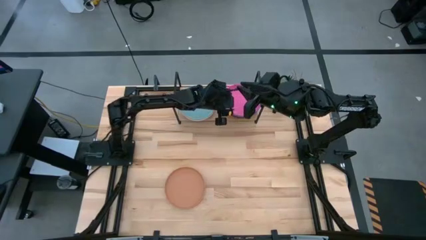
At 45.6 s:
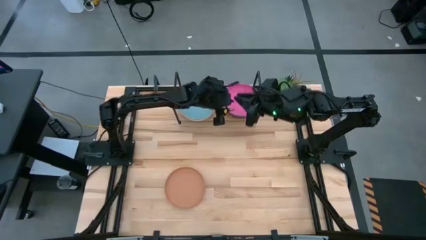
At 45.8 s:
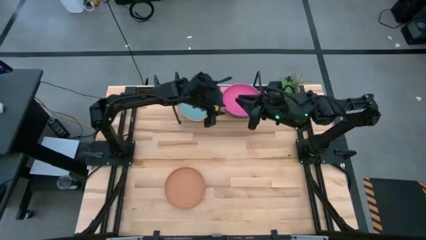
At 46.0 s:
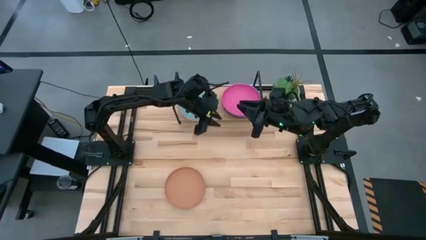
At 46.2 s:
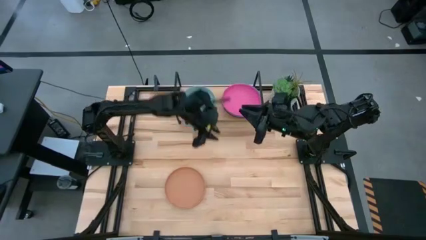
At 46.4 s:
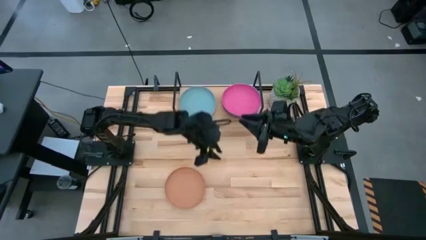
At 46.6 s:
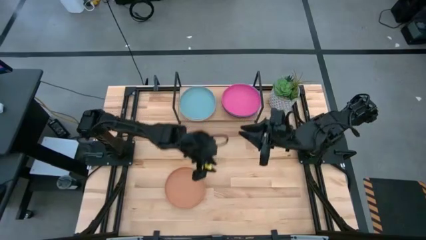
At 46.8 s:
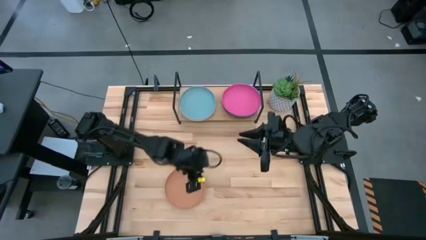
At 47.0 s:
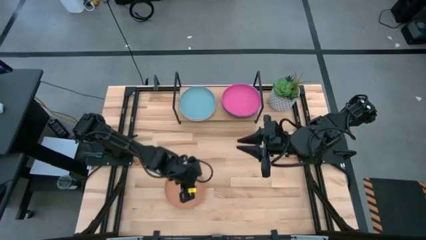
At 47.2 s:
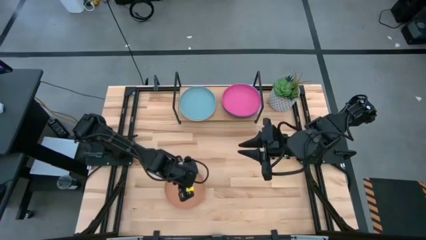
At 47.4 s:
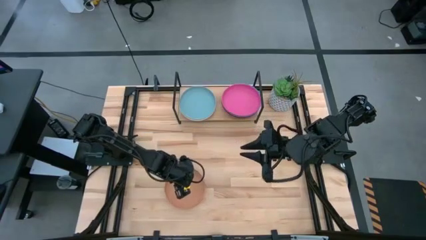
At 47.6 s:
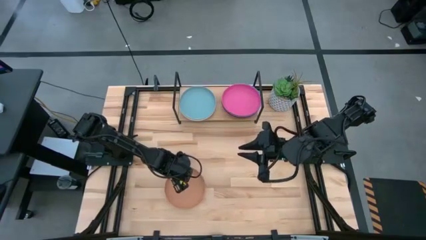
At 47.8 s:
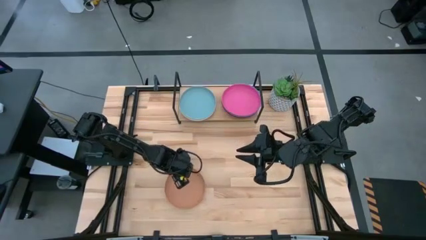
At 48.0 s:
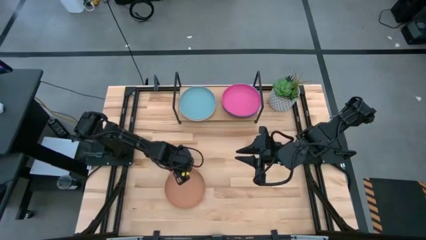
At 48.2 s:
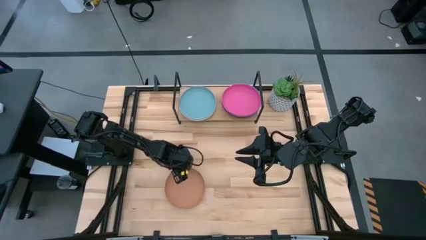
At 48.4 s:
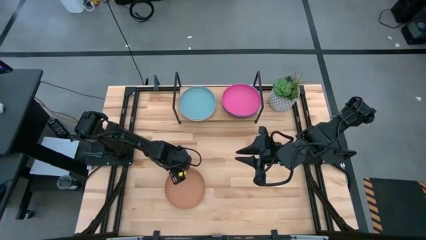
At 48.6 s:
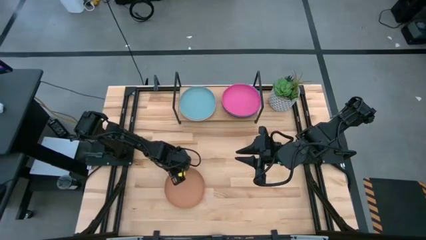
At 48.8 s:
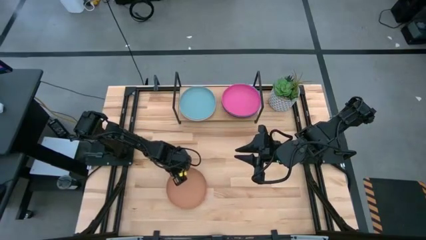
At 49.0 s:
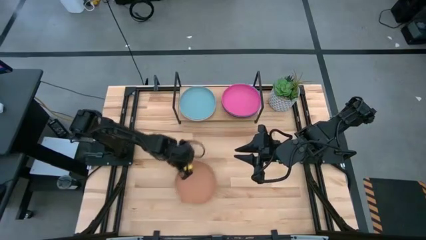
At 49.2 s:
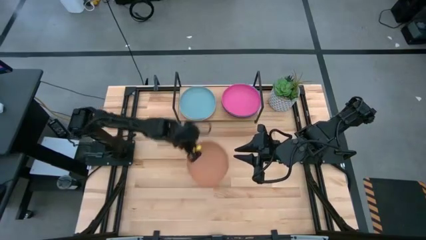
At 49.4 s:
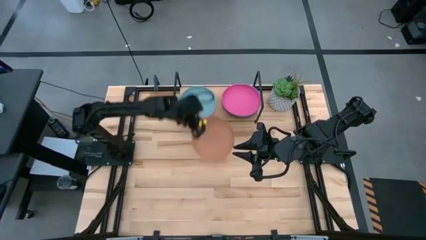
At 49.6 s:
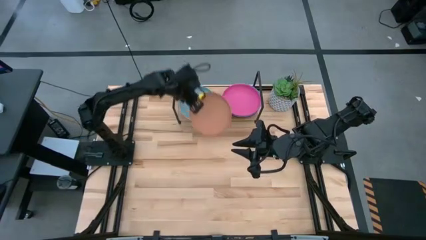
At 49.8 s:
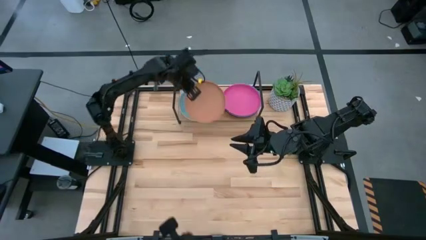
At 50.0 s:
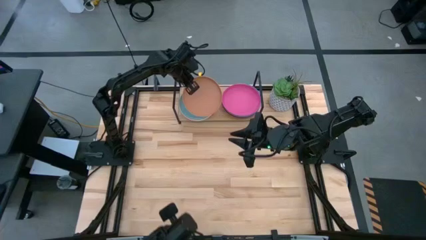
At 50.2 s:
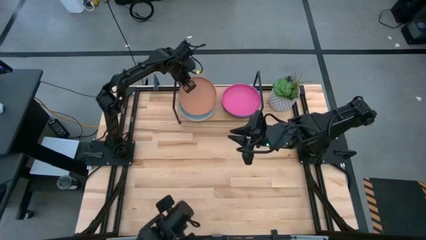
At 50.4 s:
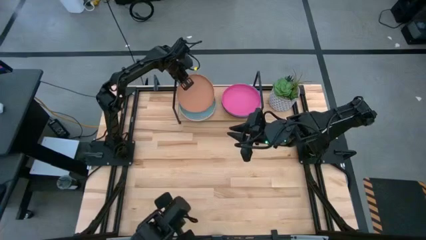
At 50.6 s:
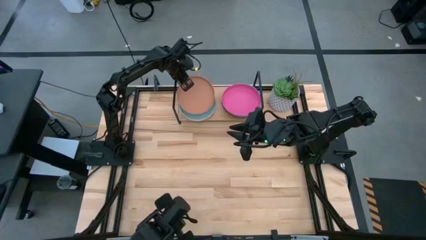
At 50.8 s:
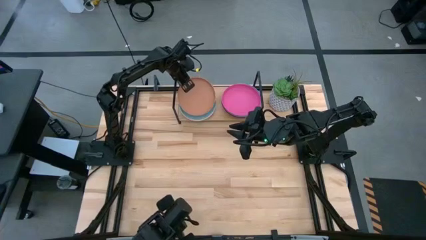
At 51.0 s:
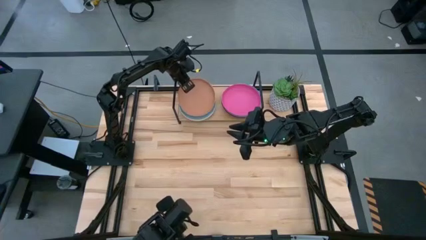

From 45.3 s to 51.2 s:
Task: Place and stack plates onto a shelf
Stack the brown plate on top of the light blue plate on the shelf

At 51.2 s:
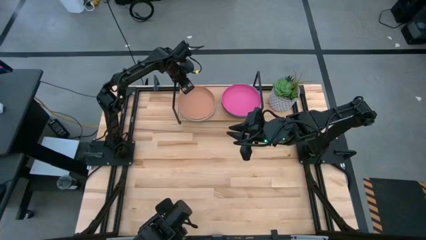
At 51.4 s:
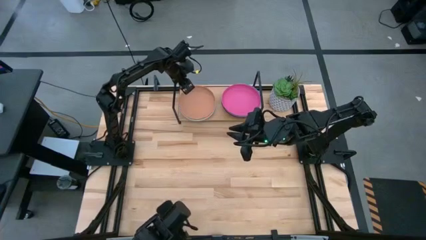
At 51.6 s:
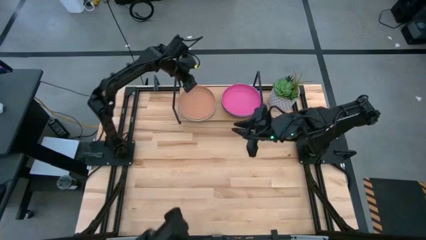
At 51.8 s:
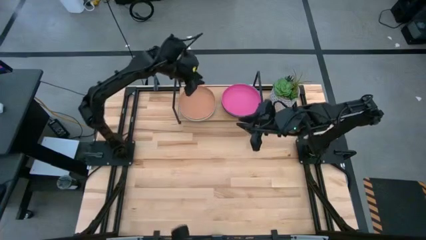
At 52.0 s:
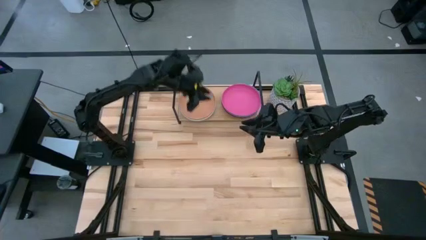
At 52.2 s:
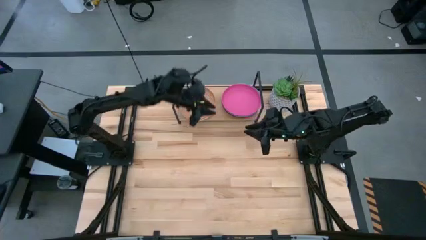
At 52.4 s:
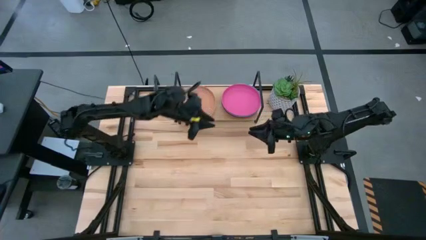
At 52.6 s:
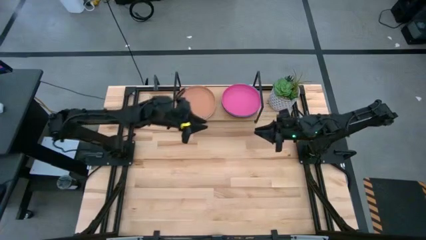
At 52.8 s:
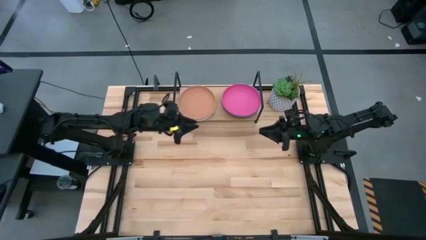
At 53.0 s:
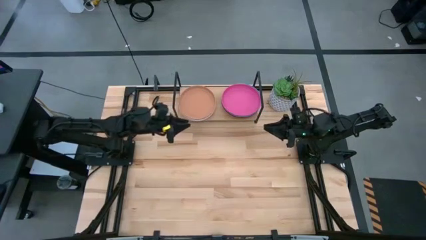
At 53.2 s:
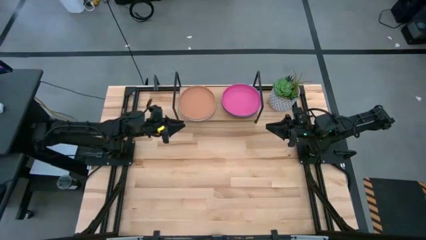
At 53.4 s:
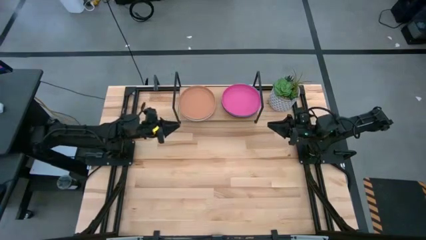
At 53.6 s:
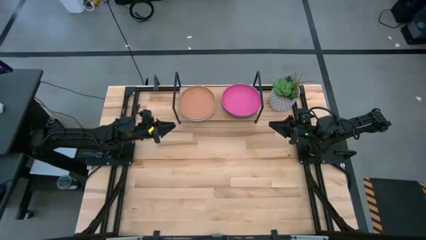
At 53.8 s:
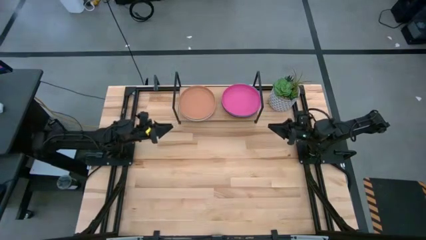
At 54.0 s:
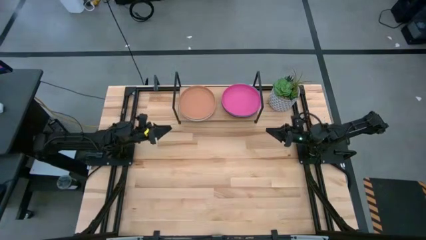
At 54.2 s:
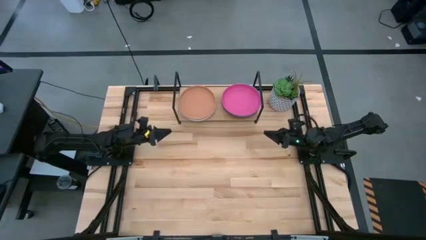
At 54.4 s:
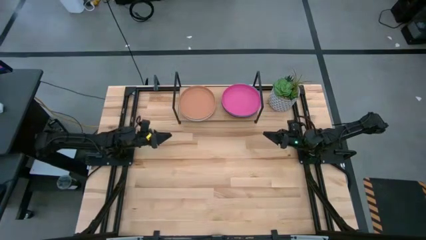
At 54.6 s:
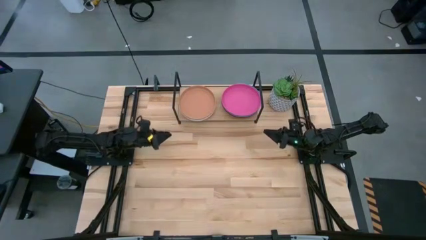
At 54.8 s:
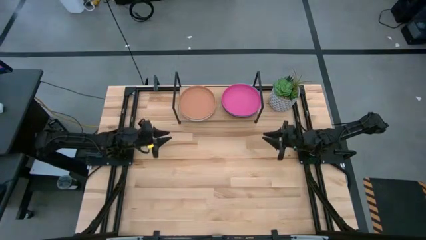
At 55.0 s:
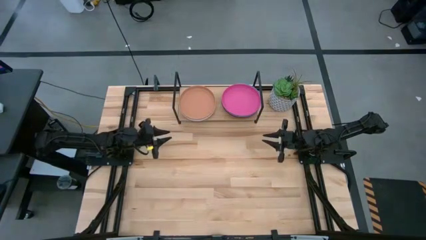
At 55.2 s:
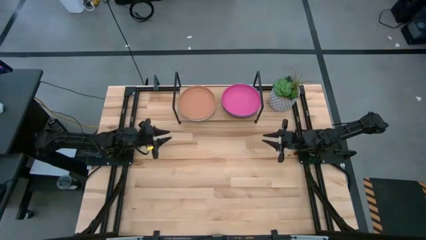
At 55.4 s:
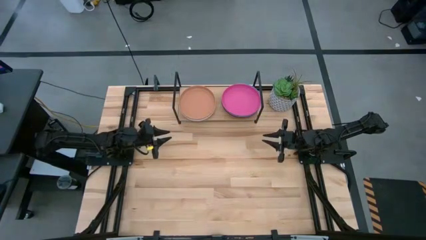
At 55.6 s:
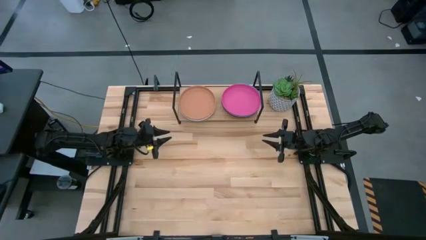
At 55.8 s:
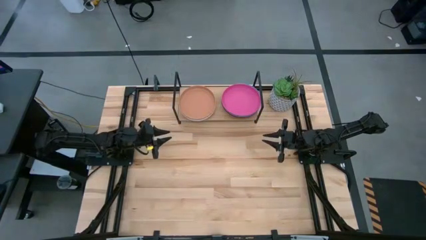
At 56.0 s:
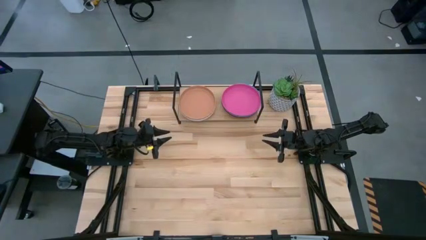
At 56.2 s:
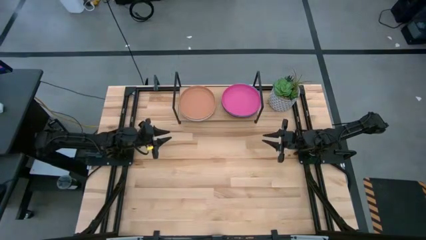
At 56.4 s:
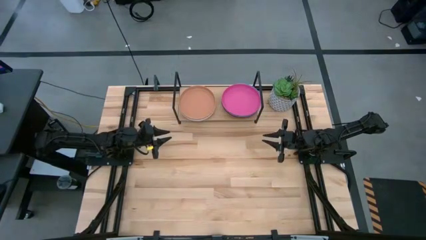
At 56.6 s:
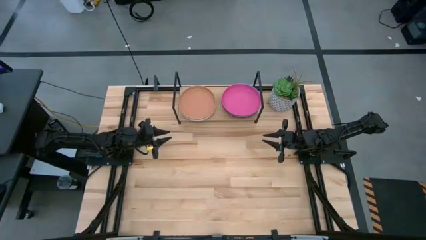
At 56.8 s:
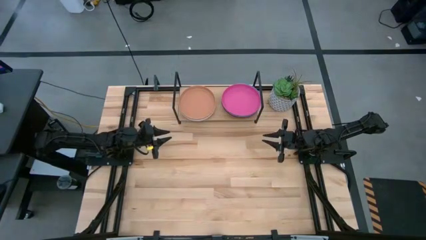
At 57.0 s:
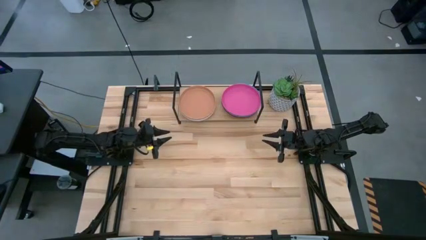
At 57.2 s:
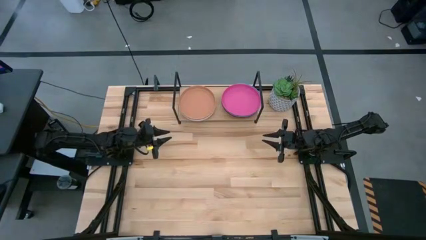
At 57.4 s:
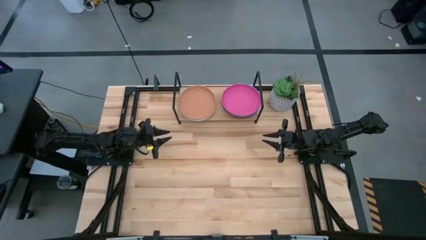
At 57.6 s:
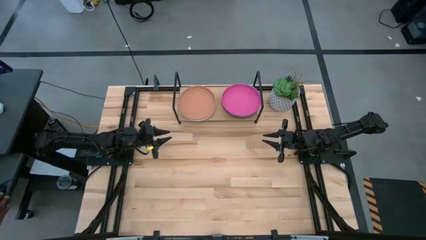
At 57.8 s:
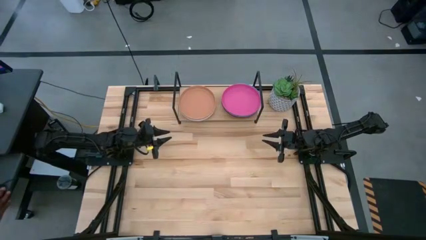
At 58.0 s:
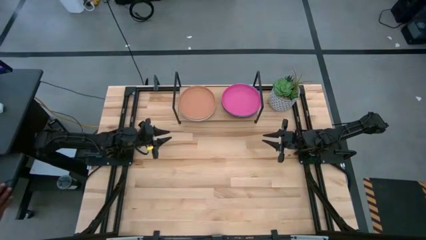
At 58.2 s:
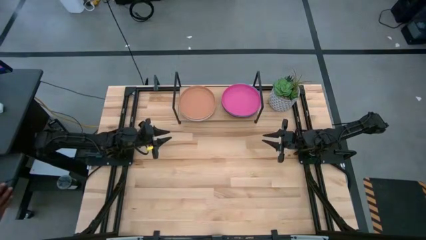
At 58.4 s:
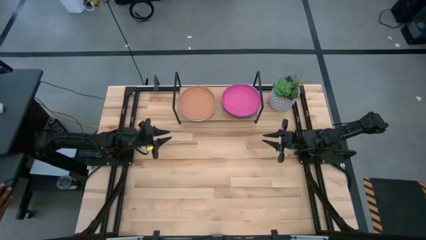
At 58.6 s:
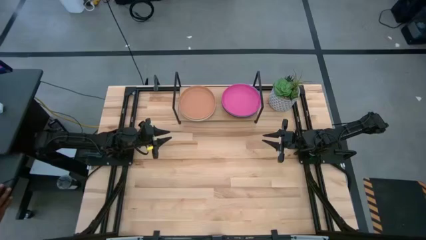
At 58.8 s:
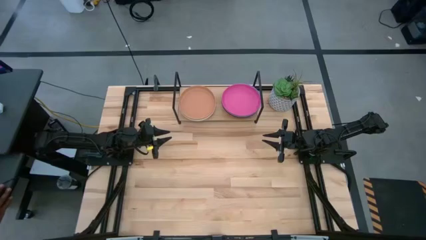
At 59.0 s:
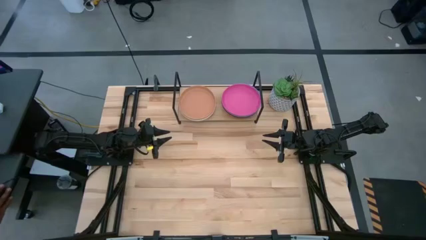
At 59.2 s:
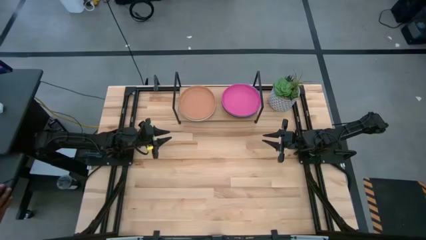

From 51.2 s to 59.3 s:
Return to Home Position

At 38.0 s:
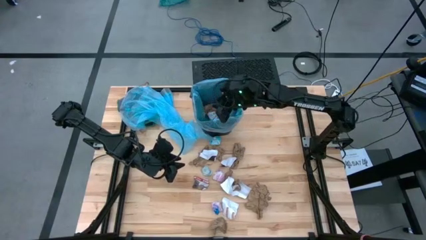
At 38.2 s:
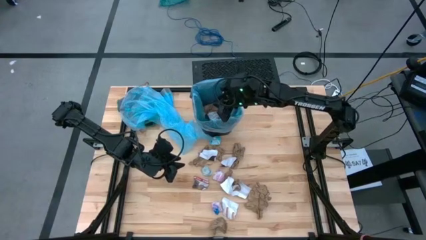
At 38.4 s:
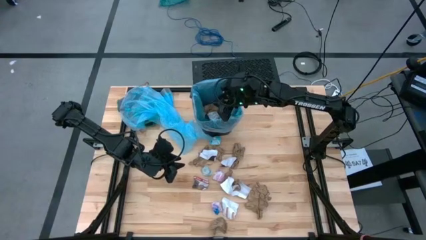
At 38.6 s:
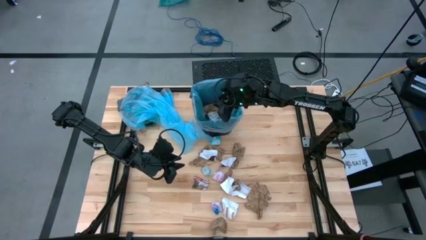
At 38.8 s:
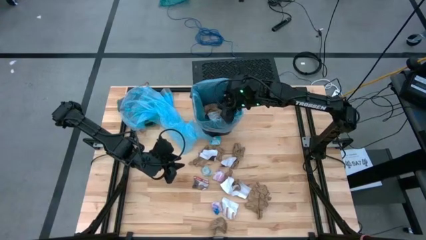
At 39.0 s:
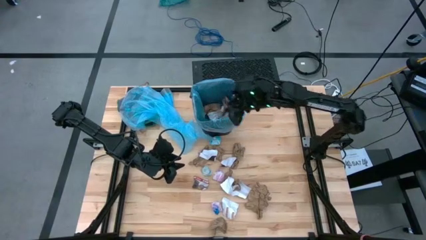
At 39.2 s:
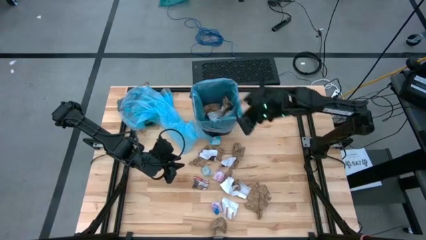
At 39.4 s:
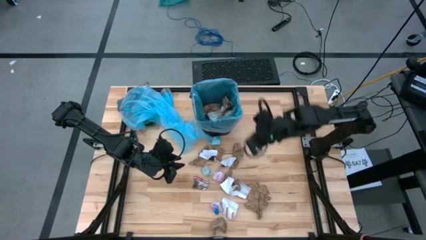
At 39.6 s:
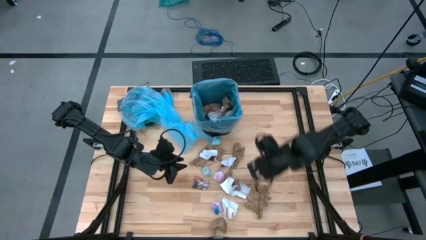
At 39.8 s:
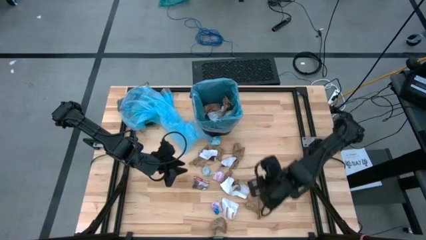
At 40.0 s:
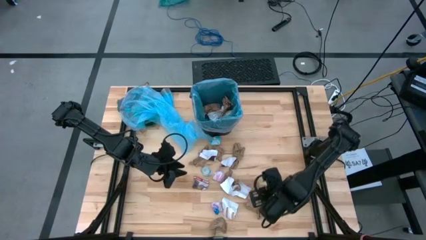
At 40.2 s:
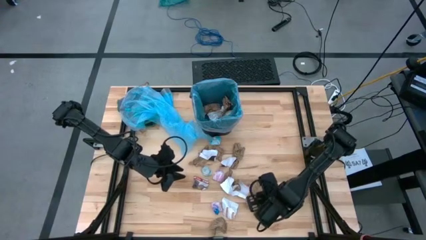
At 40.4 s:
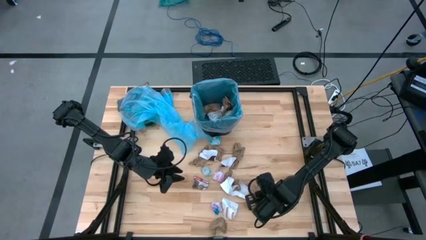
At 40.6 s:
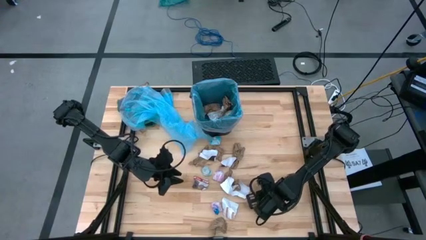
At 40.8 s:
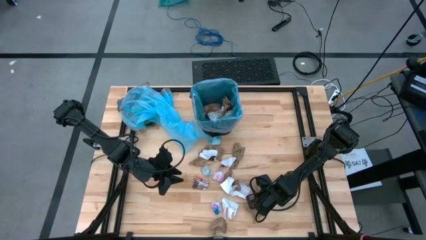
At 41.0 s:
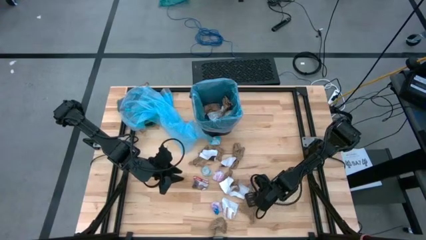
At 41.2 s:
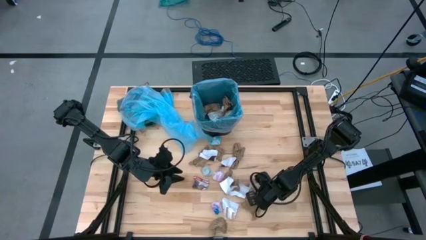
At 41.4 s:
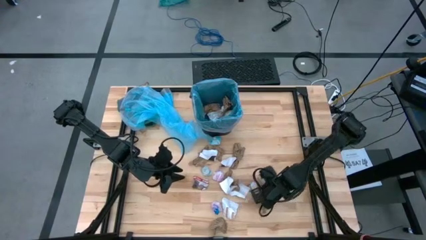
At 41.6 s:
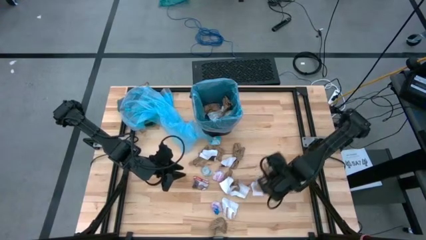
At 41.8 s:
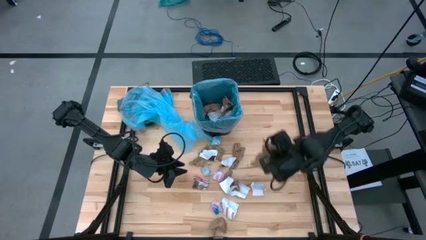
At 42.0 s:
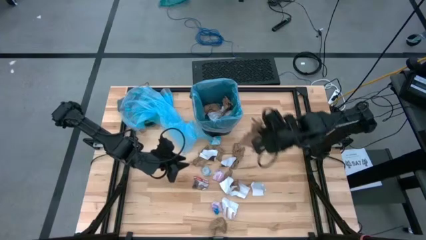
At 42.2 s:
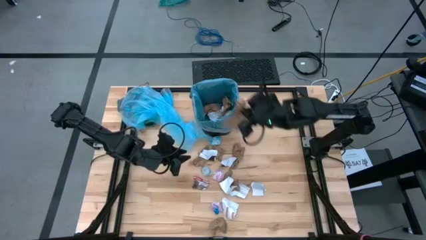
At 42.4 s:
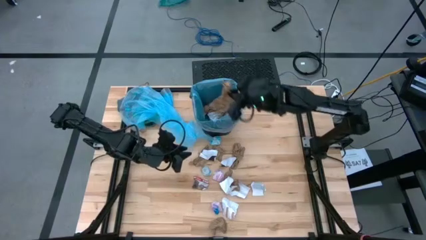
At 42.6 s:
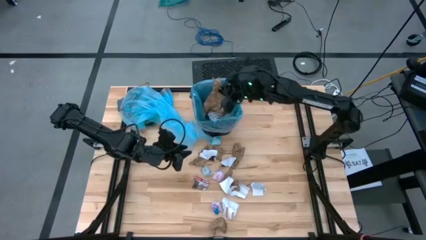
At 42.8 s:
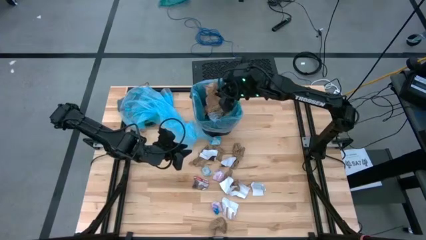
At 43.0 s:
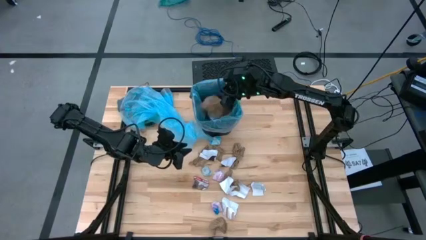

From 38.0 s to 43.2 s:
Task: place trash/remove bag and relplace
Put the brown paper into the trash bin
